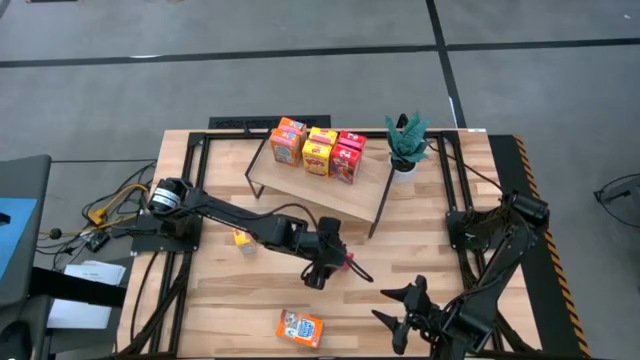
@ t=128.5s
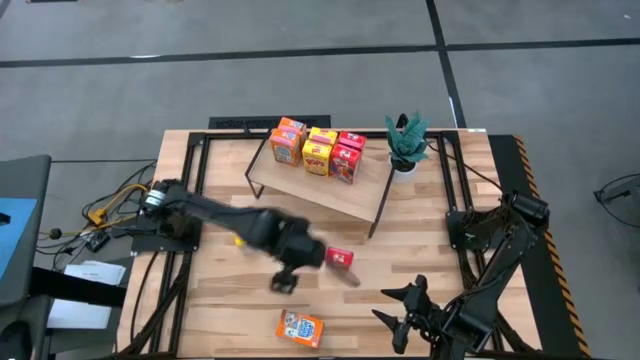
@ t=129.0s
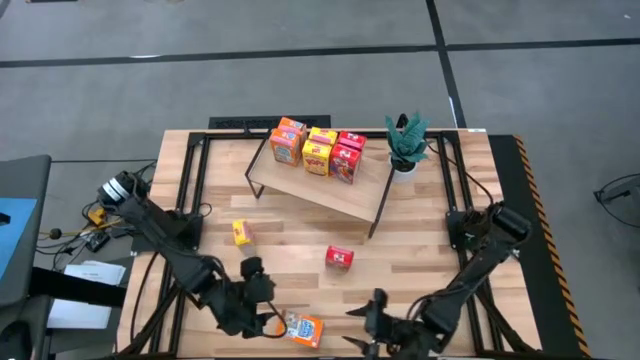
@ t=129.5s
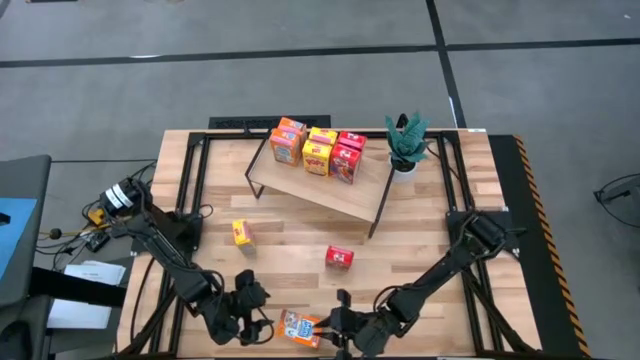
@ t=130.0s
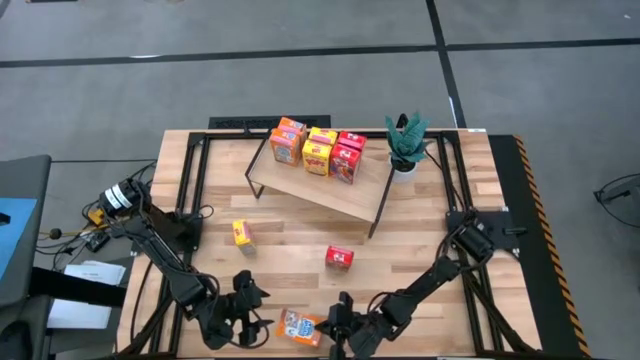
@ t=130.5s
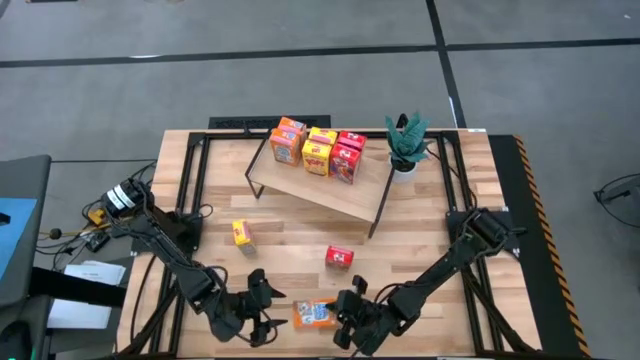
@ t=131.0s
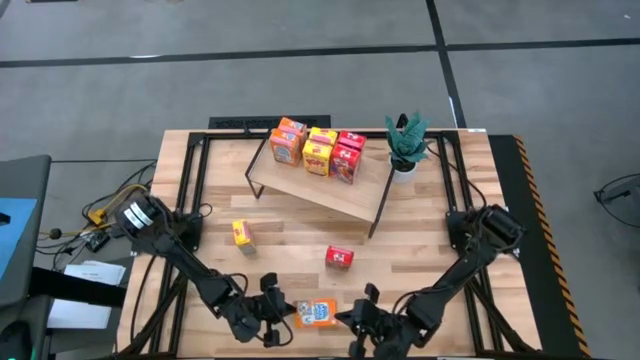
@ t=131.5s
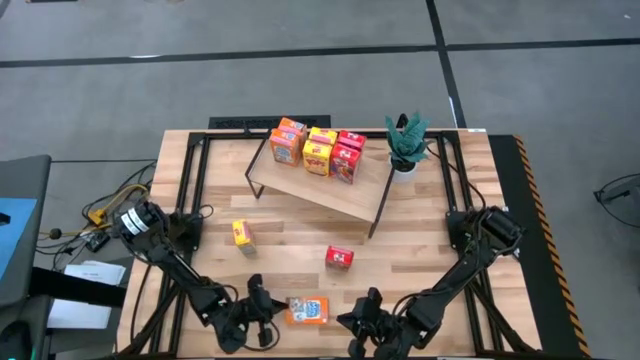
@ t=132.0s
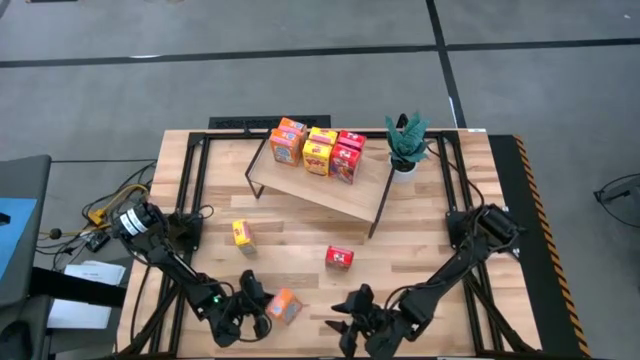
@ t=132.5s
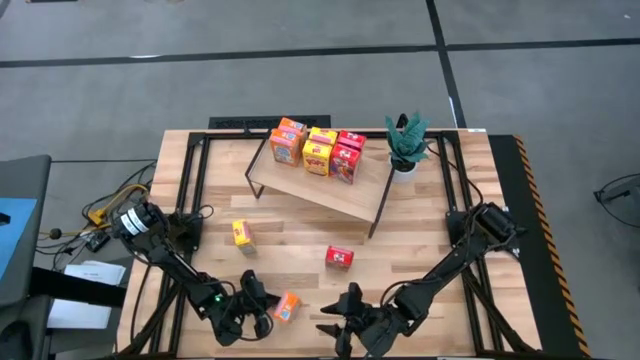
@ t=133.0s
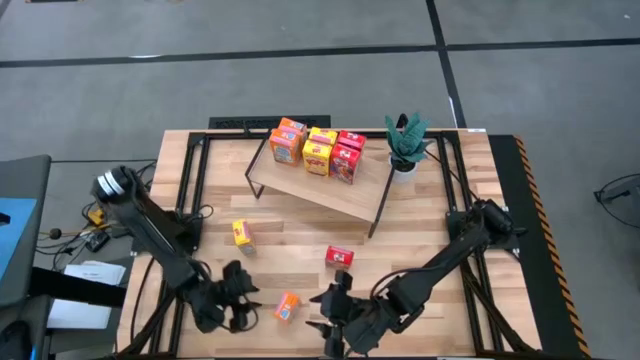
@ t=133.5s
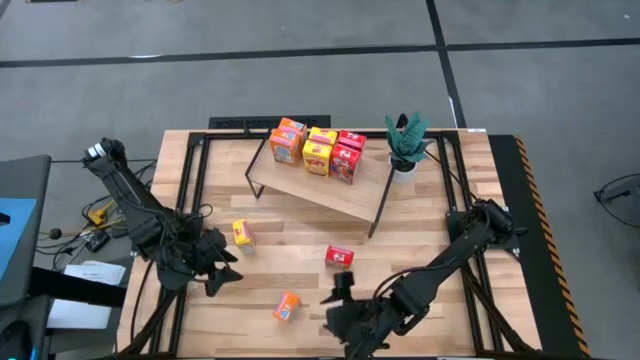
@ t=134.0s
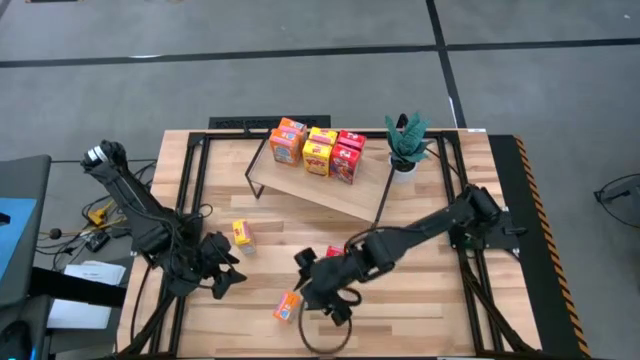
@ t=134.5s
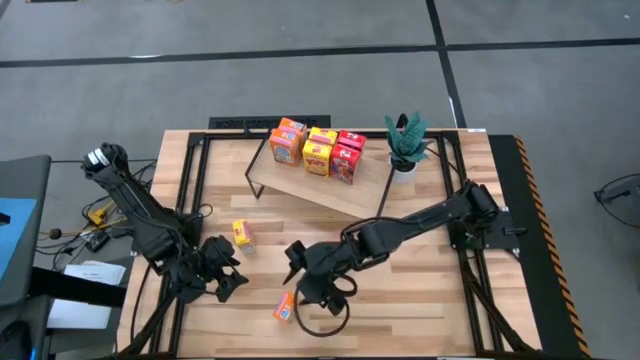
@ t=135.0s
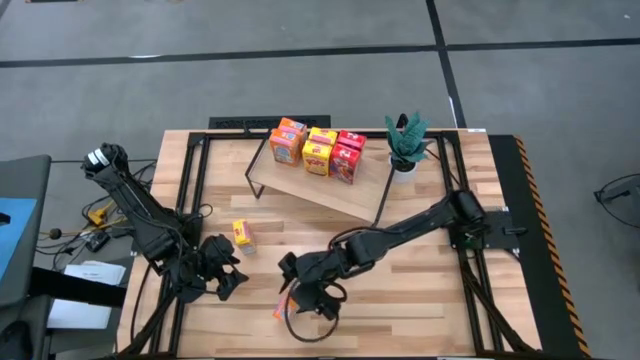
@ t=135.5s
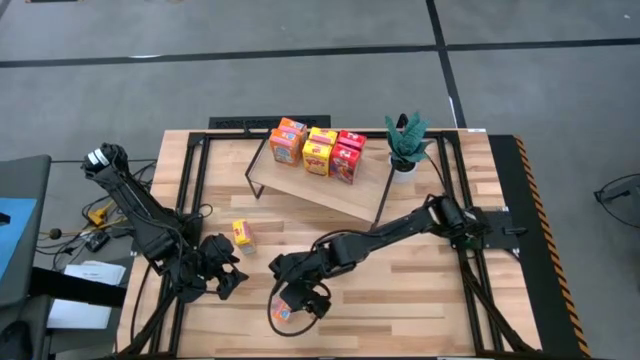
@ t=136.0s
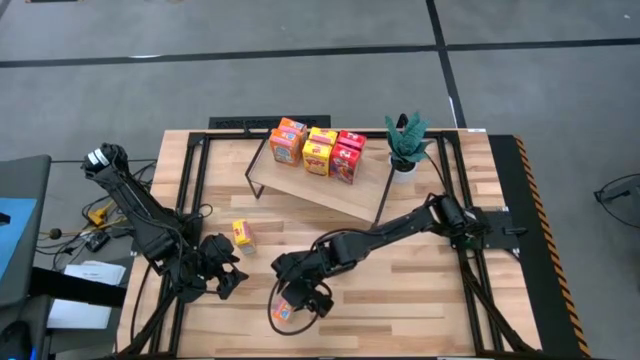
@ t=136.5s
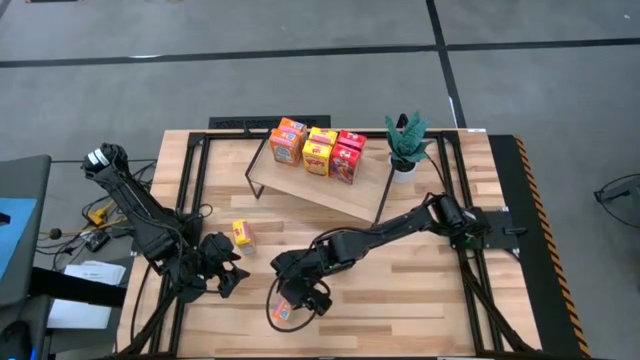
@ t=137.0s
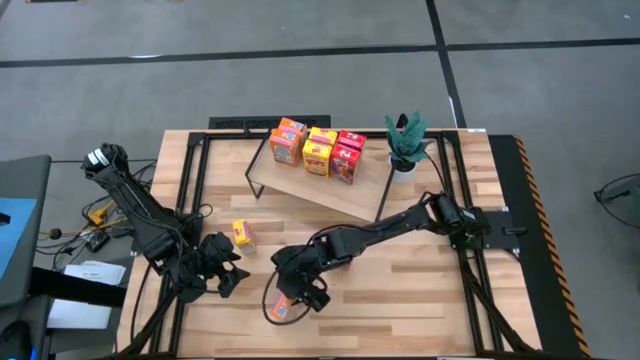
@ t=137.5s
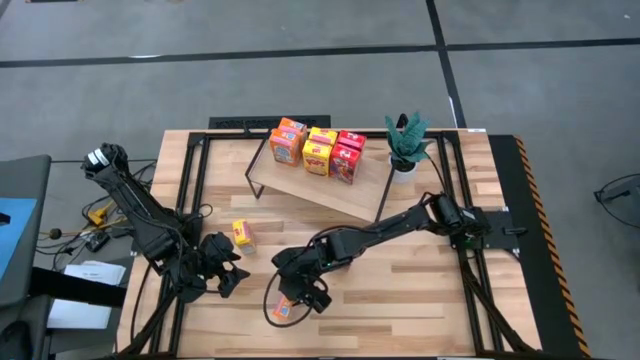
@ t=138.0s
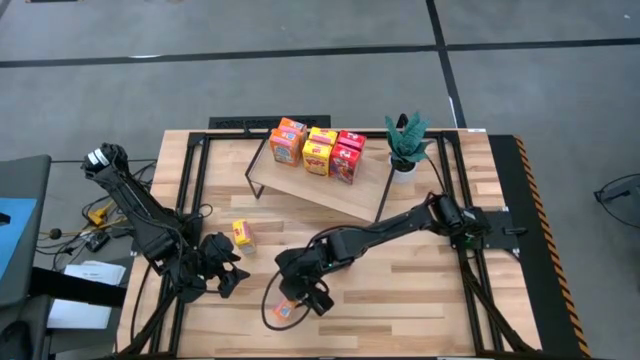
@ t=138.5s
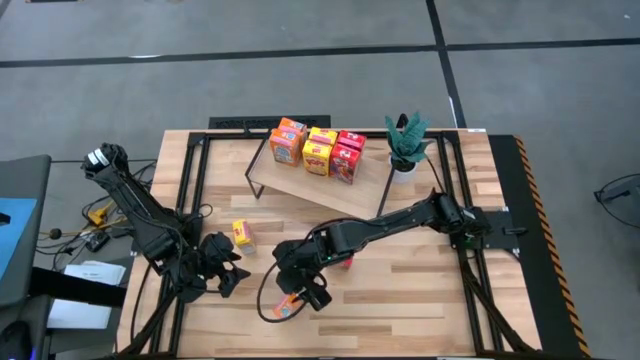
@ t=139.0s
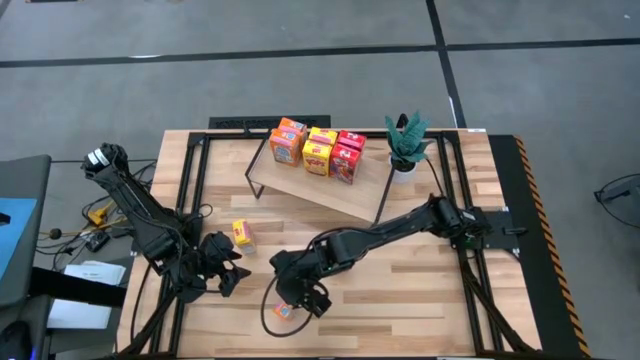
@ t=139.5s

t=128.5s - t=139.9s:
Task: Stack cereal on shelf
Put the orange cereal box on the shelf

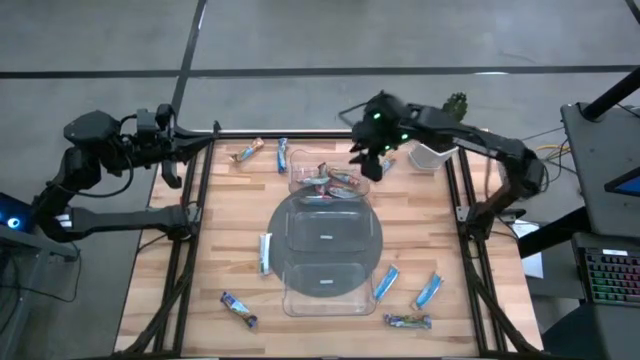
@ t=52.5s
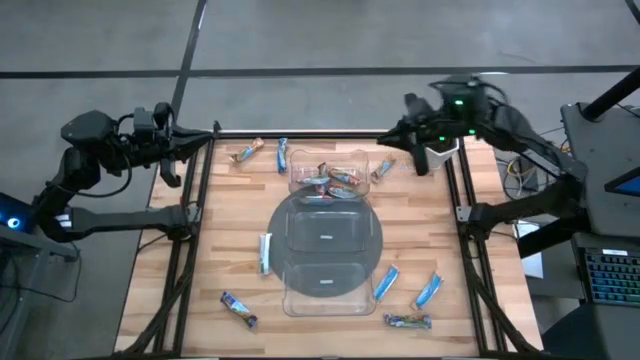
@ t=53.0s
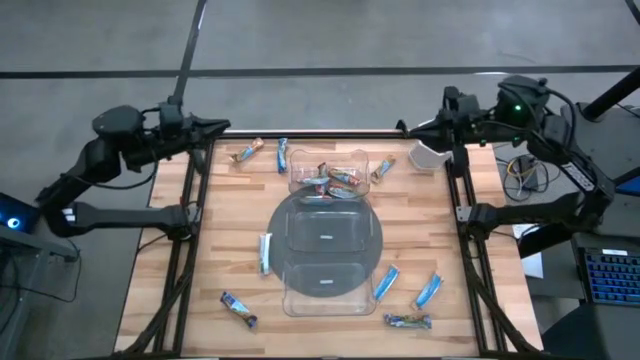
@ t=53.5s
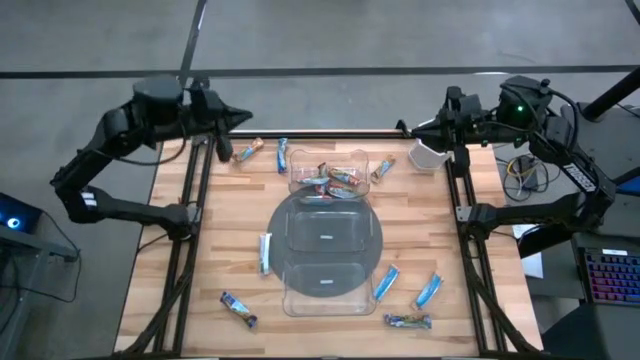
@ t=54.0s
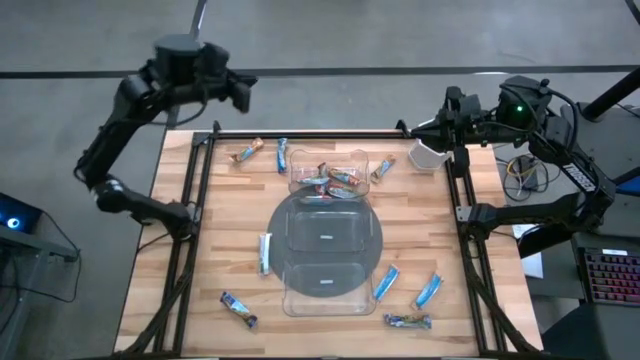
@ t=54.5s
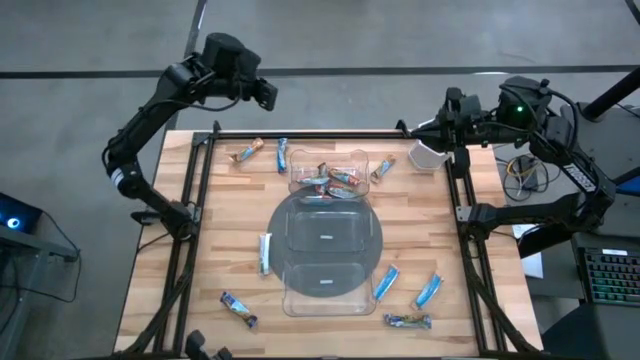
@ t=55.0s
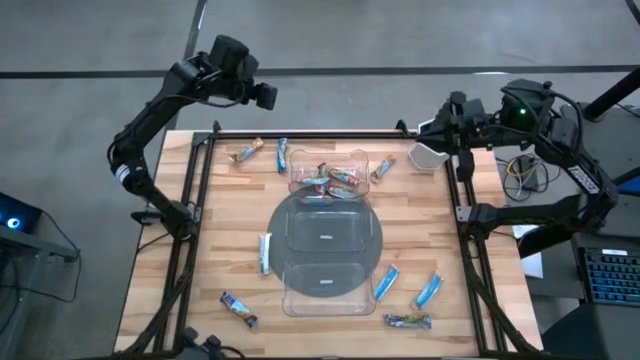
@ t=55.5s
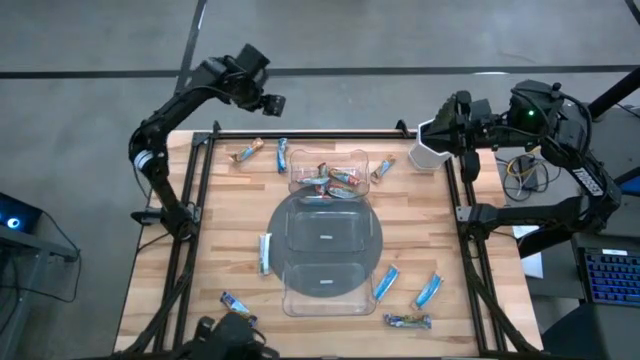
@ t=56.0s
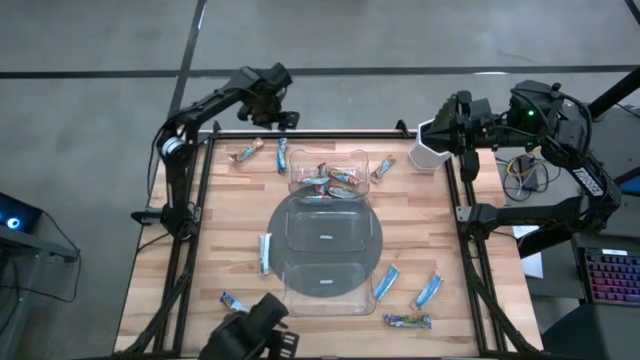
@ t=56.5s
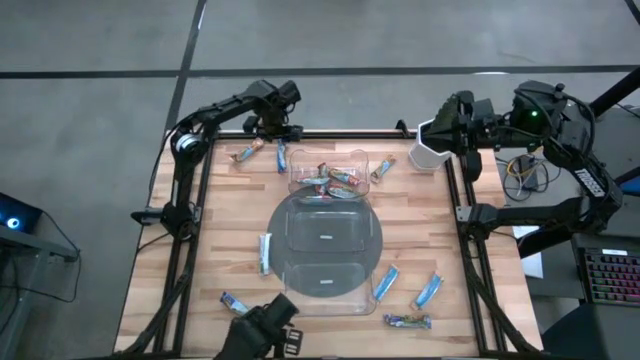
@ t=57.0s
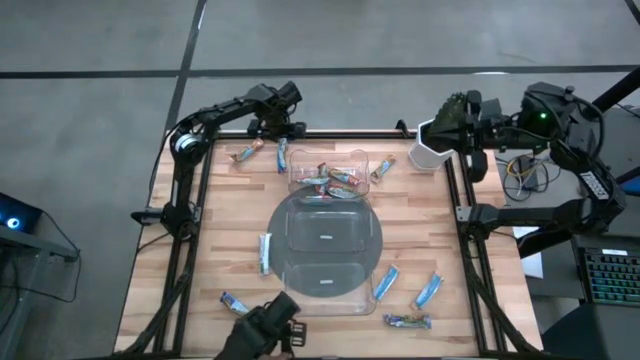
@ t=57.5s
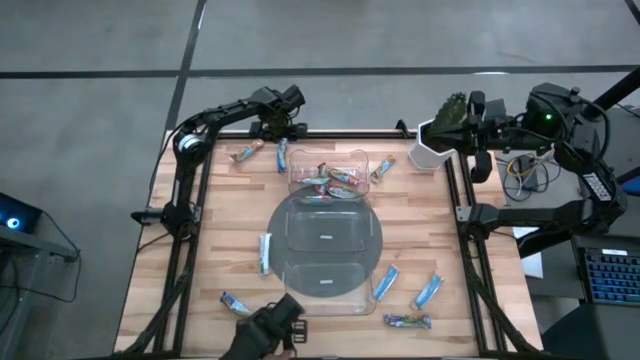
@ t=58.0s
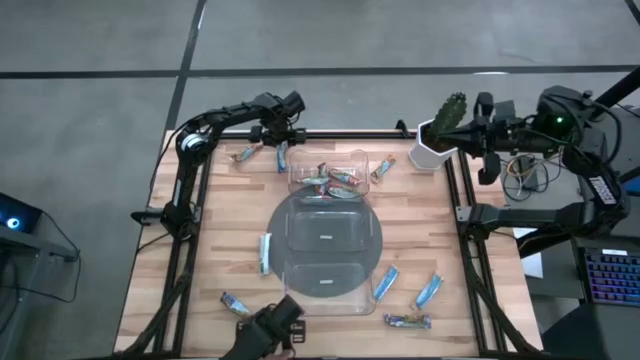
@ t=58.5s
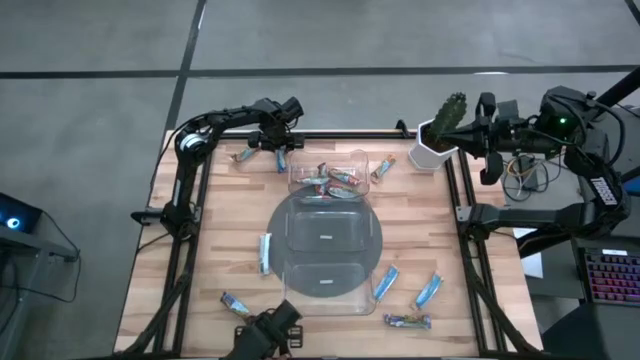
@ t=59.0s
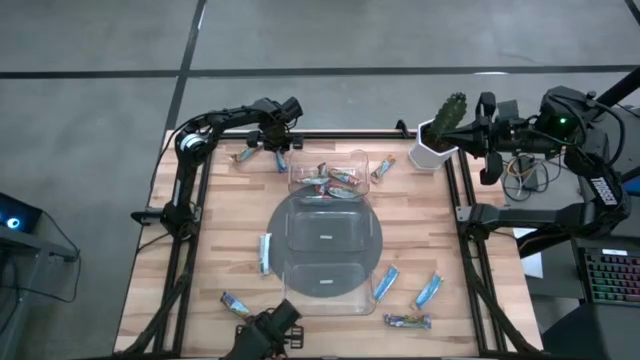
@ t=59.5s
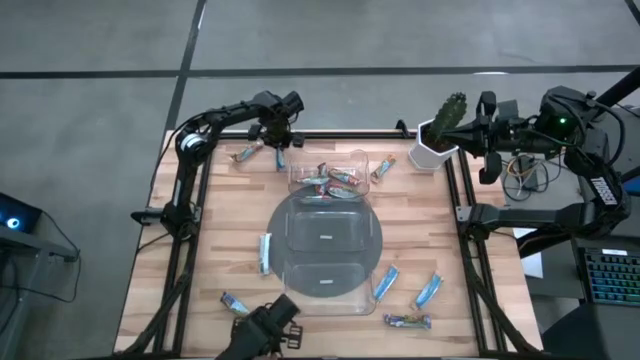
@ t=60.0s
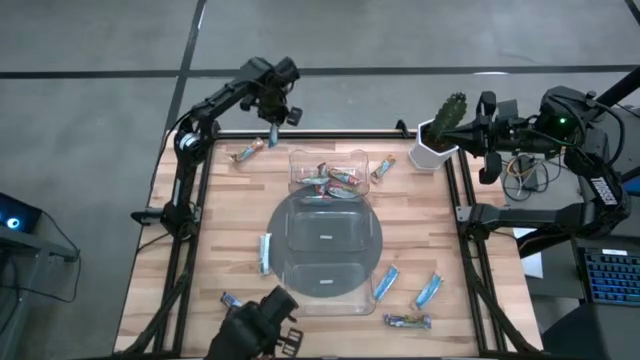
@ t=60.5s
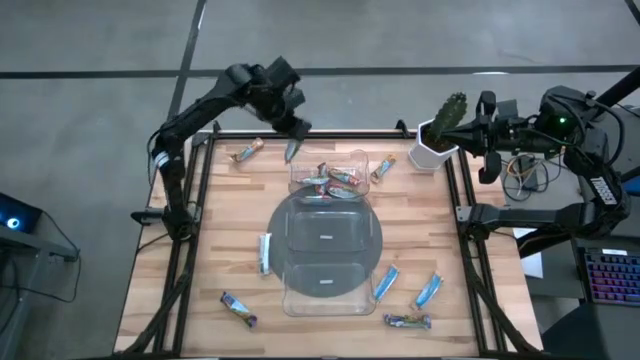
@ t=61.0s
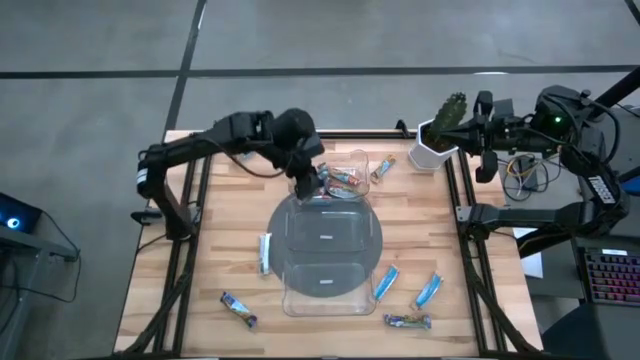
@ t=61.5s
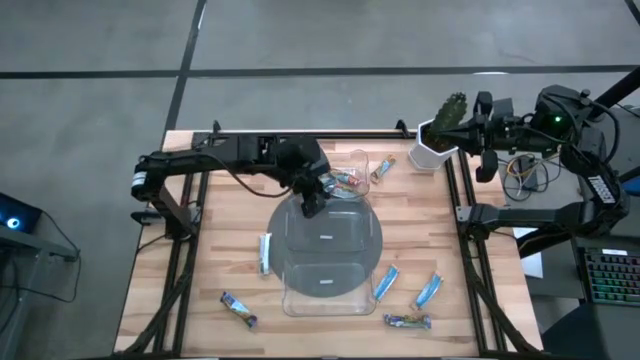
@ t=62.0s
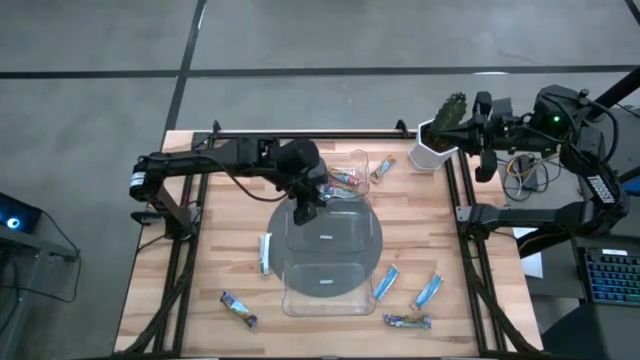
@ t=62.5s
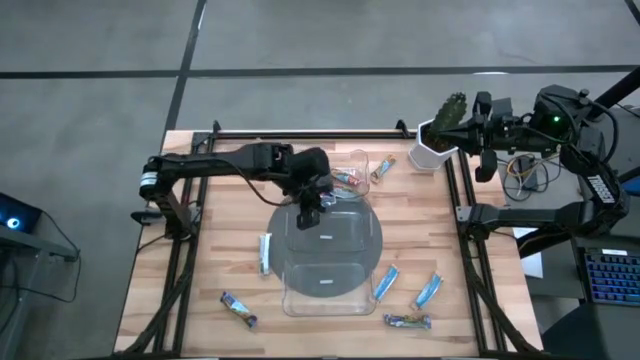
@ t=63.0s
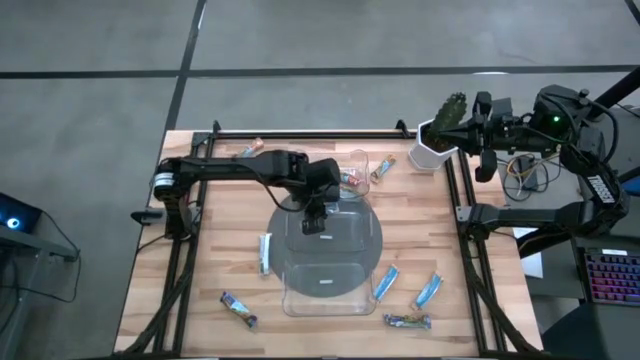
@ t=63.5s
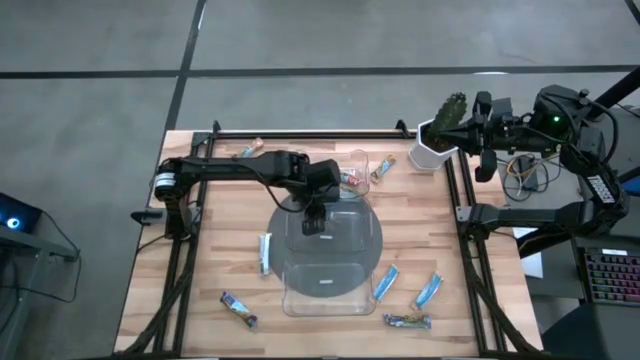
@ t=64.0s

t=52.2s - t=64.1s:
Task: Pick and place Granola Bars by type
Put the blue granola bar into the middle transparent bin
